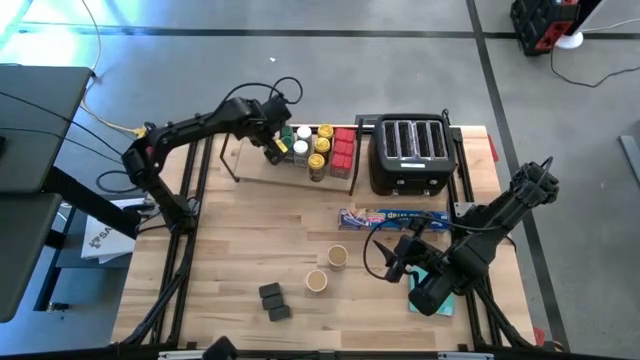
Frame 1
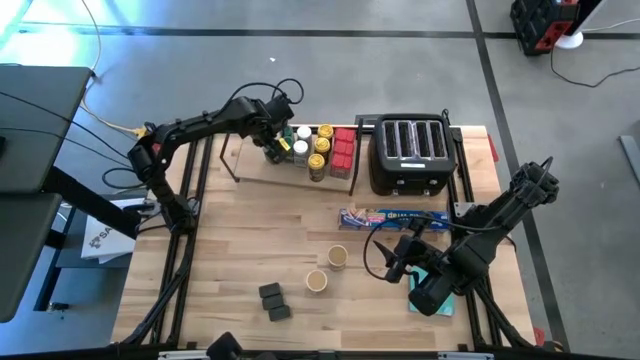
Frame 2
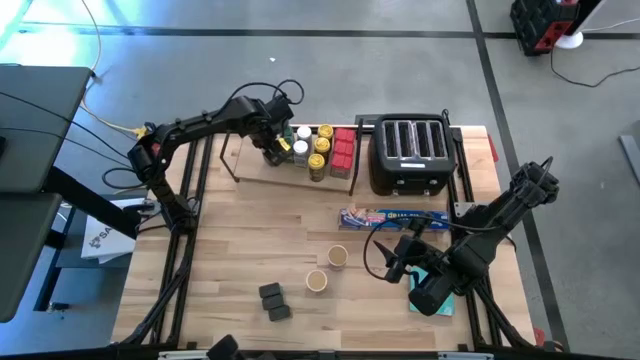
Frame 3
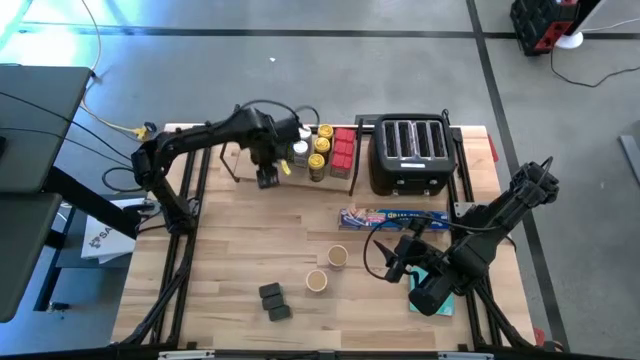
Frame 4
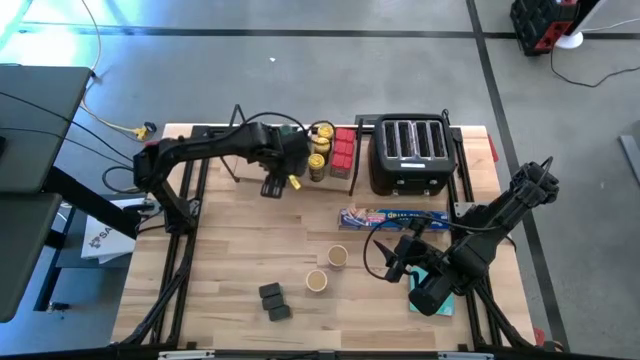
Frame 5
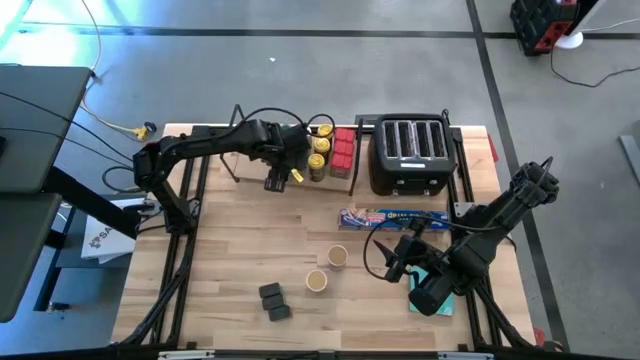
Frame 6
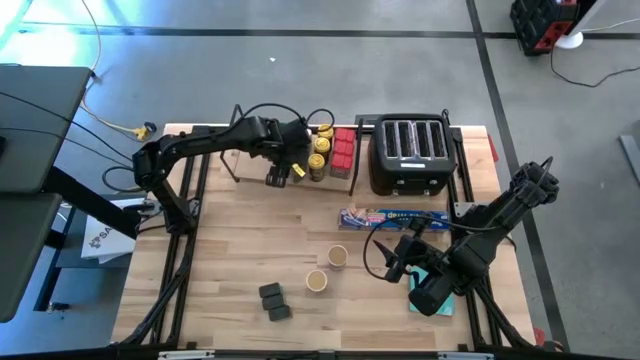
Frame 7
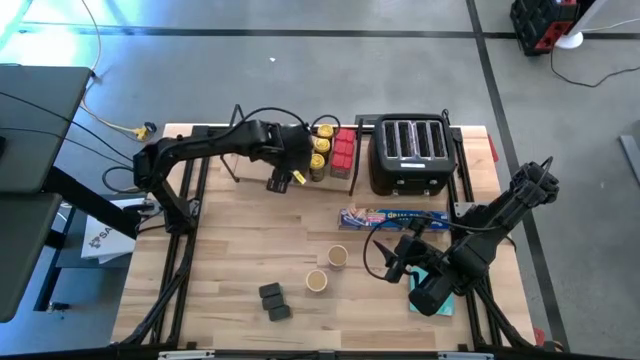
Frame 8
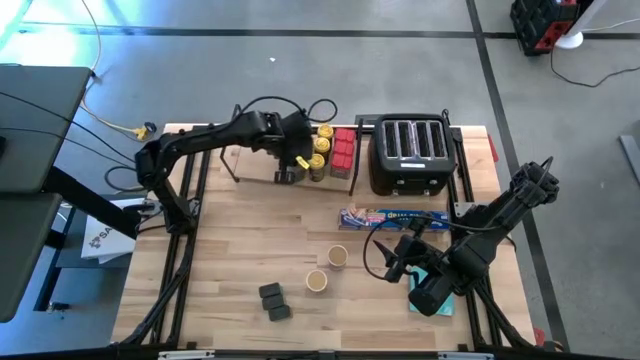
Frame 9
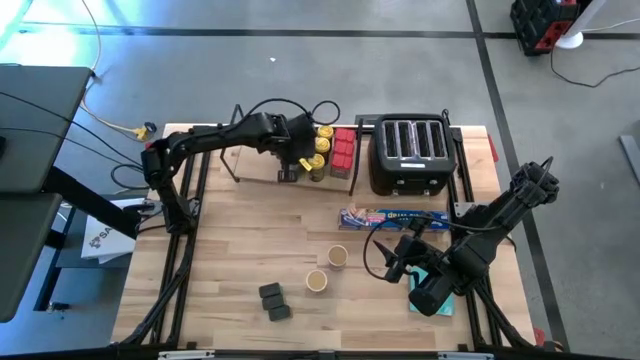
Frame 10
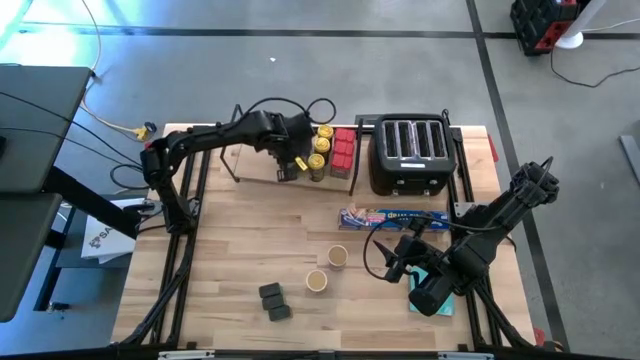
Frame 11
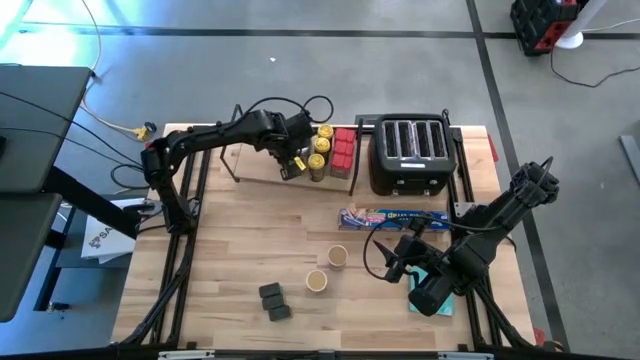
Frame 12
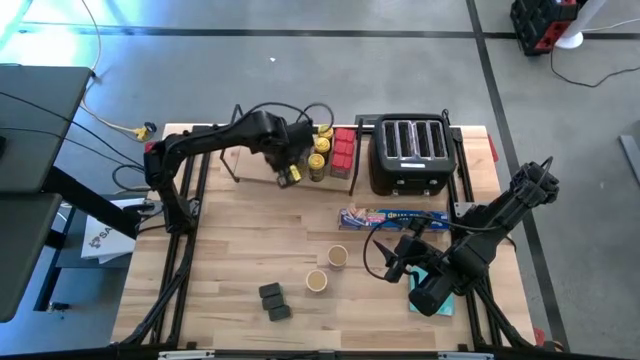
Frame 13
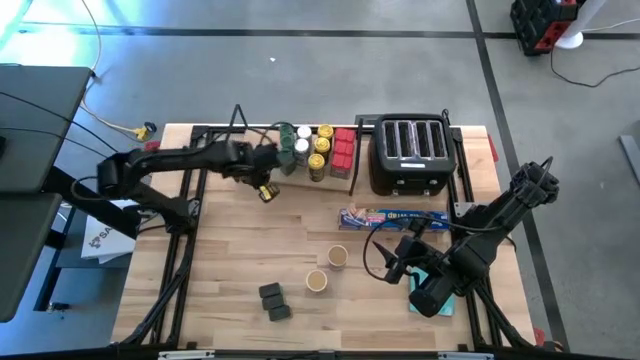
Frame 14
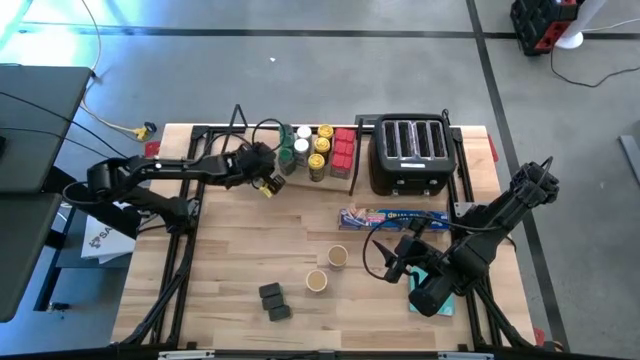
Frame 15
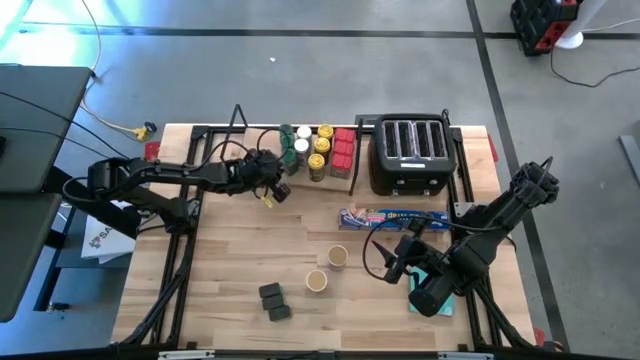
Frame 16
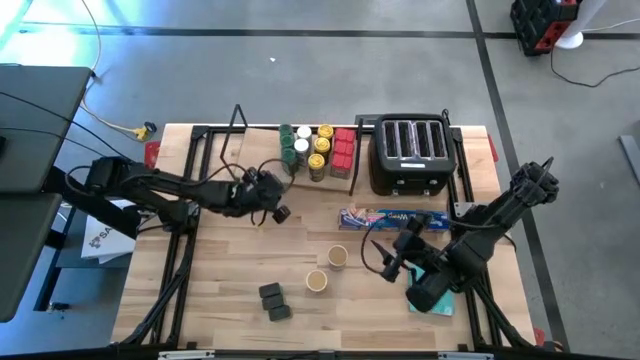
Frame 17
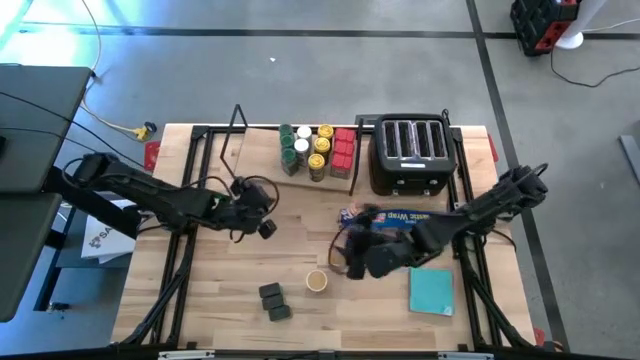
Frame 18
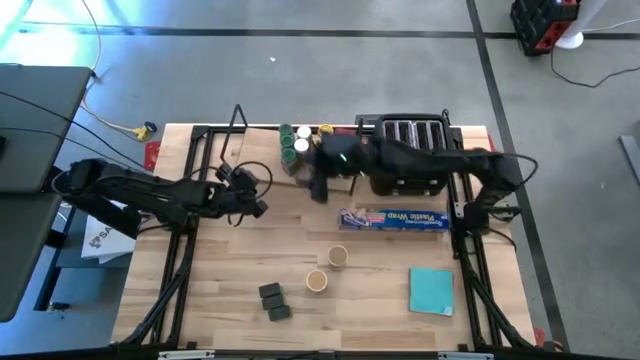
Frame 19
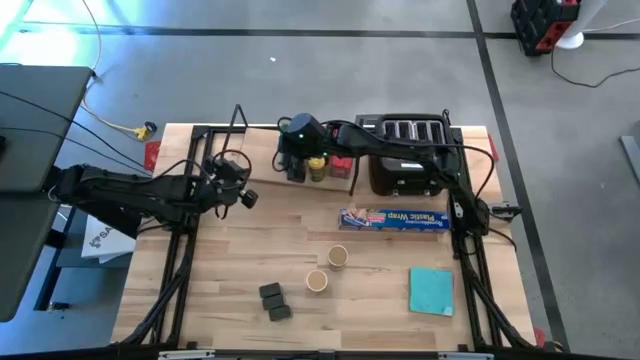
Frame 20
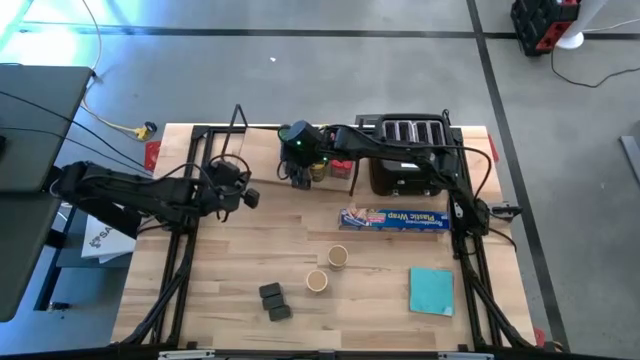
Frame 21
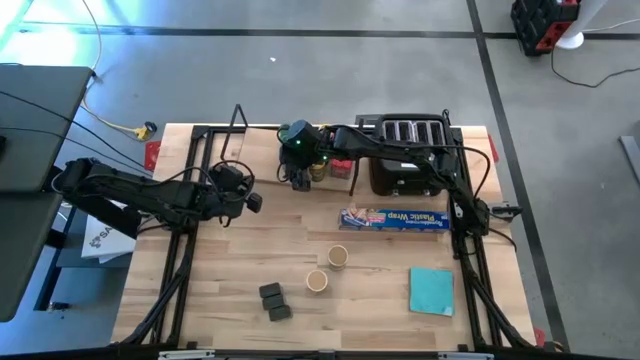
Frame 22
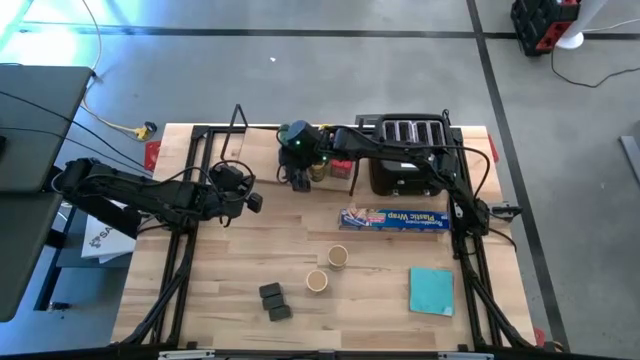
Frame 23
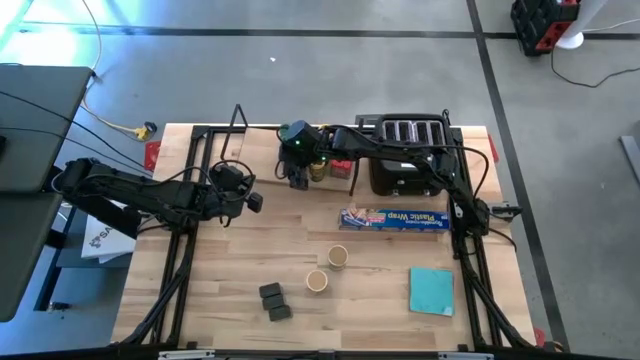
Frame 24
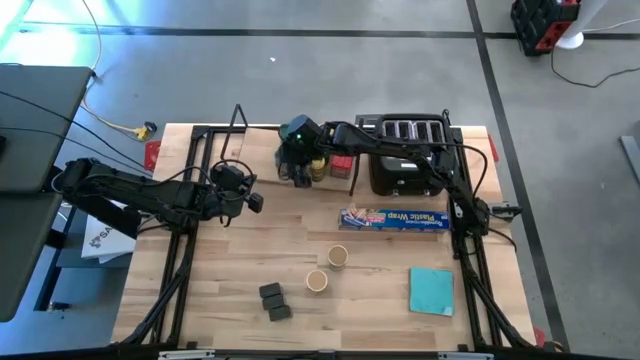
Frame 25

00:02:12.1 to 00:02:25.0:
Task: Shelf spices
Put the green seasoning bottle on the shelf aligned with the other green seasoning bottles

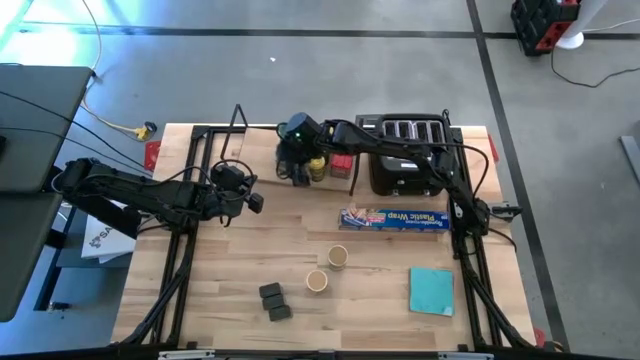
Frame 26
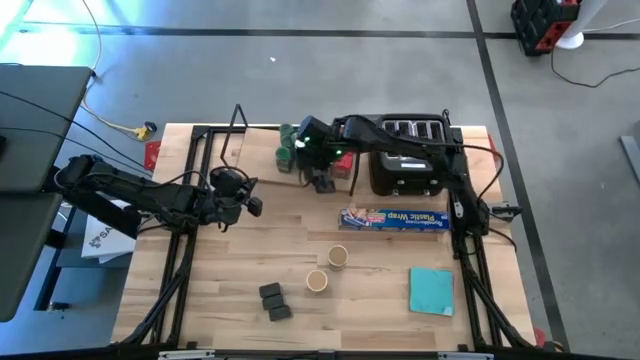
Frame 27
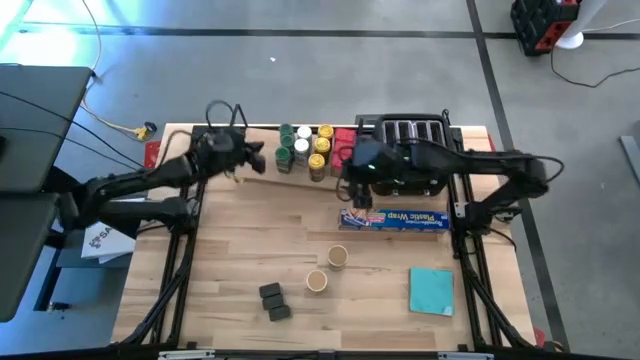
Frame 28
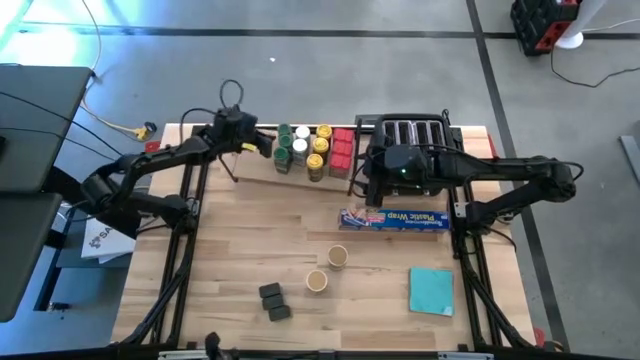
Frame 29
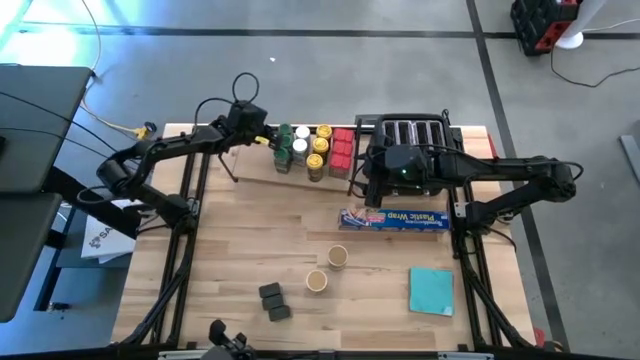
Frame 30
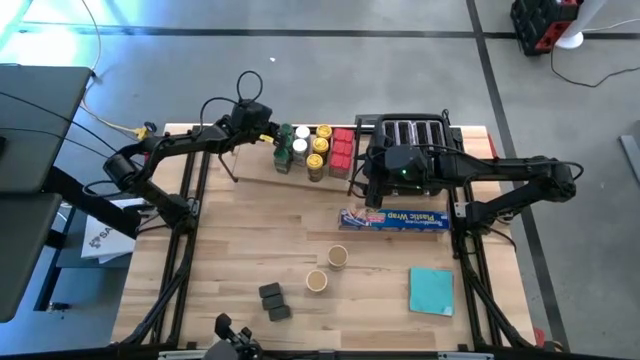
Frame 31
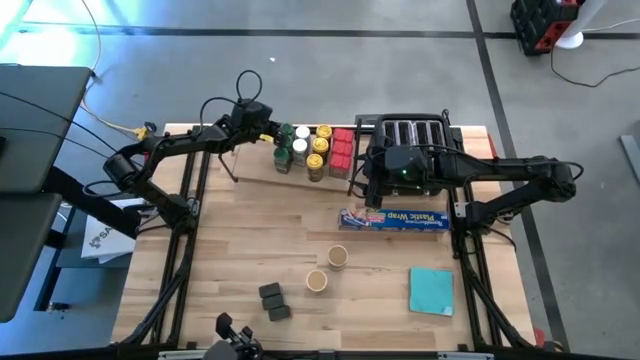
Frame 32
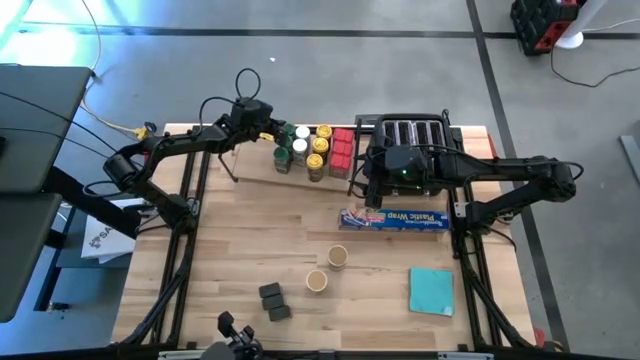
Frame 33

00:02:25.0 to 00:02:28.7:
Adjust the green seasoning bottles on the shelf

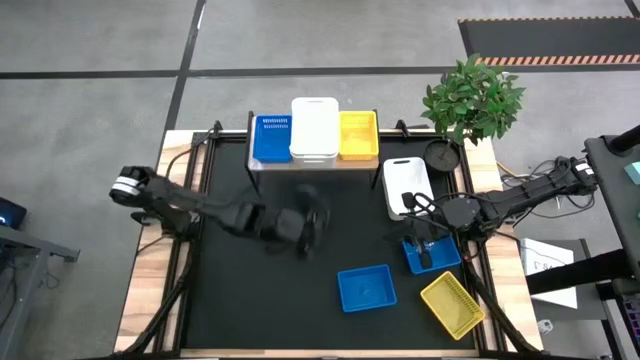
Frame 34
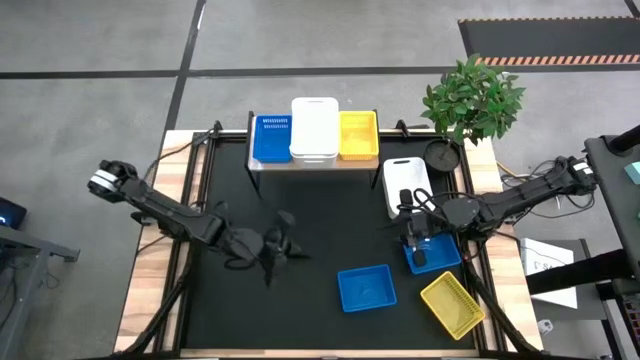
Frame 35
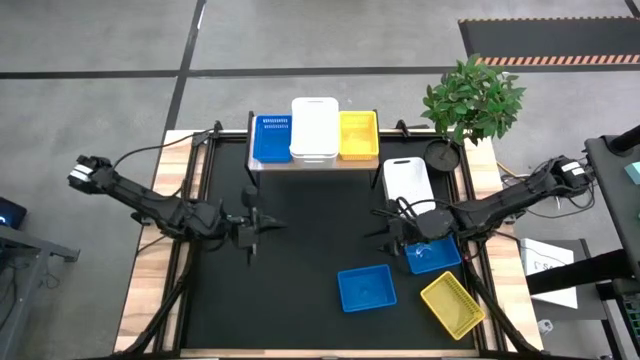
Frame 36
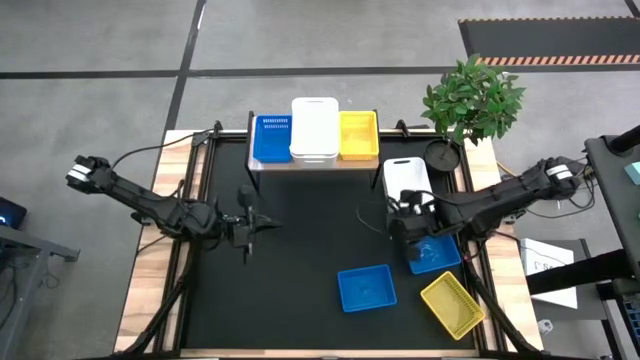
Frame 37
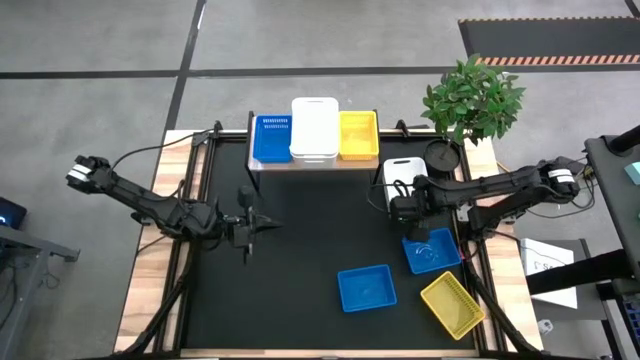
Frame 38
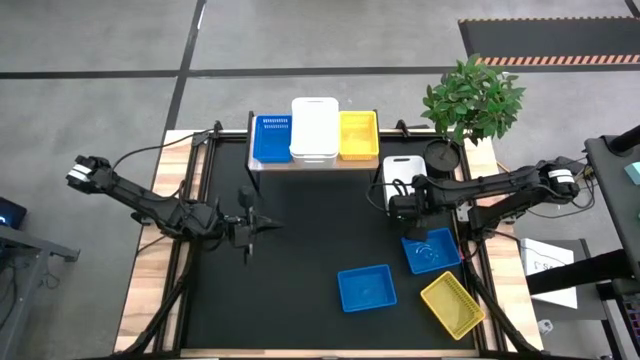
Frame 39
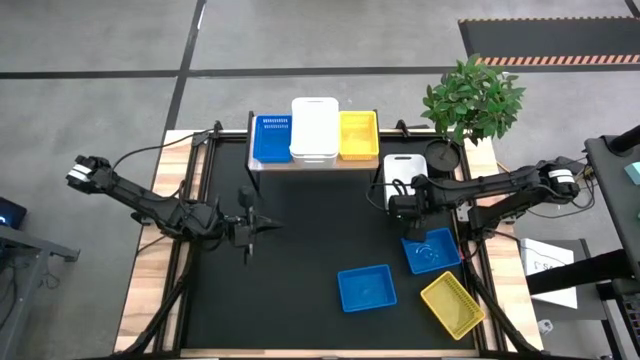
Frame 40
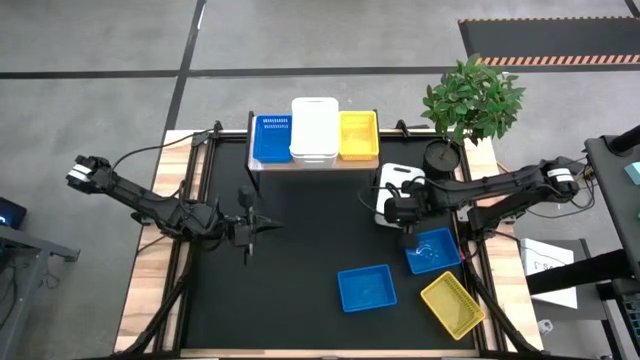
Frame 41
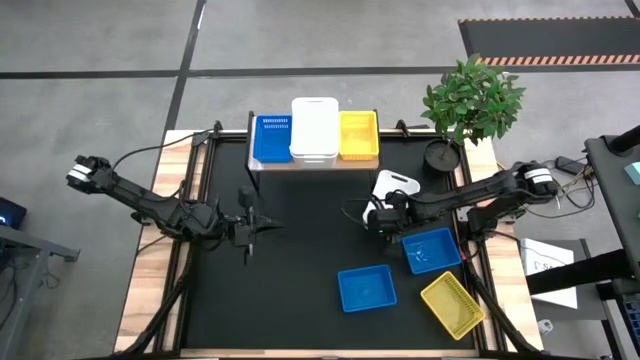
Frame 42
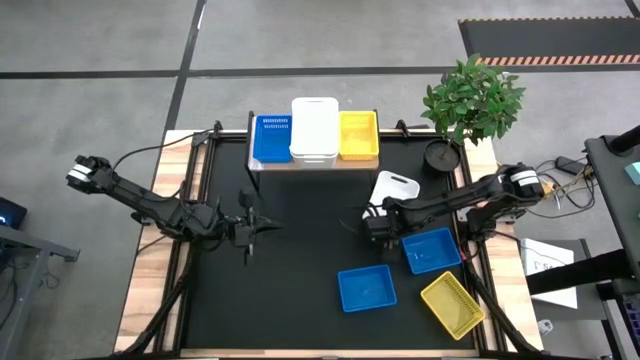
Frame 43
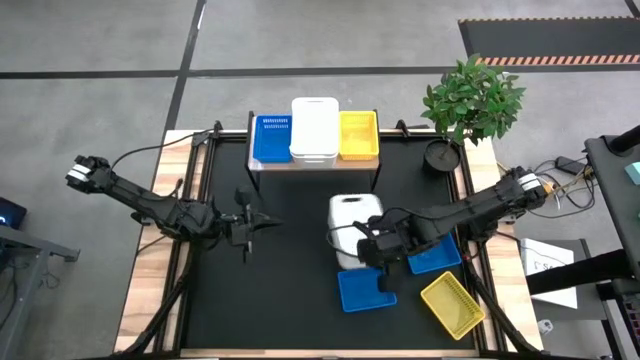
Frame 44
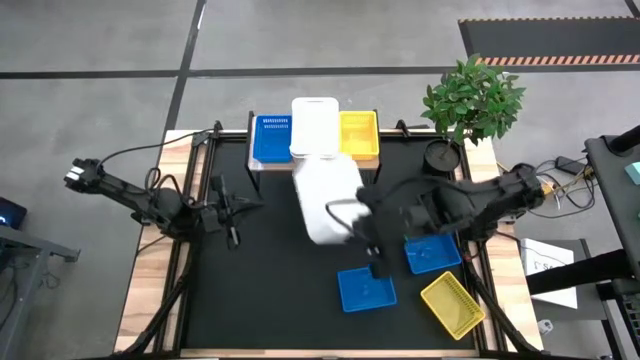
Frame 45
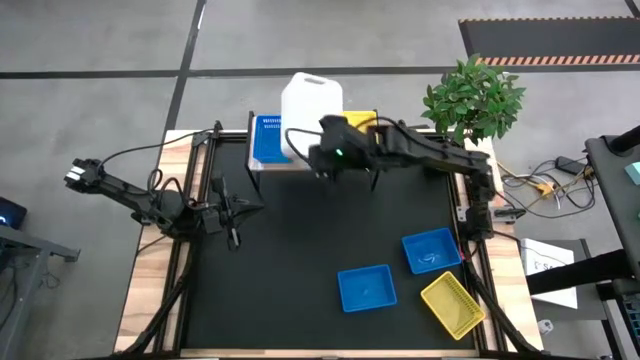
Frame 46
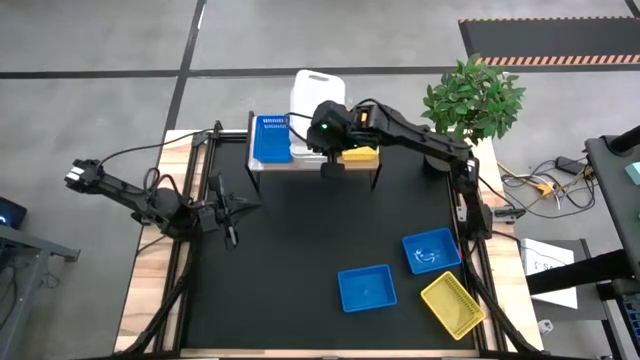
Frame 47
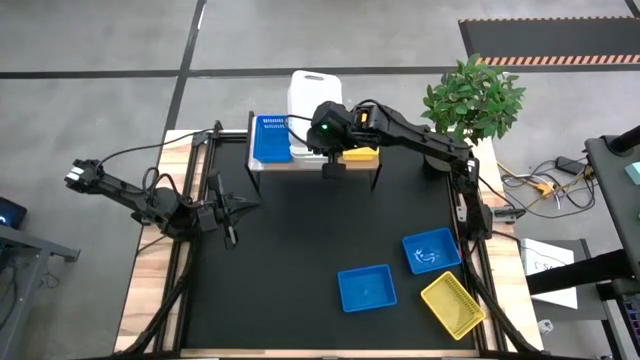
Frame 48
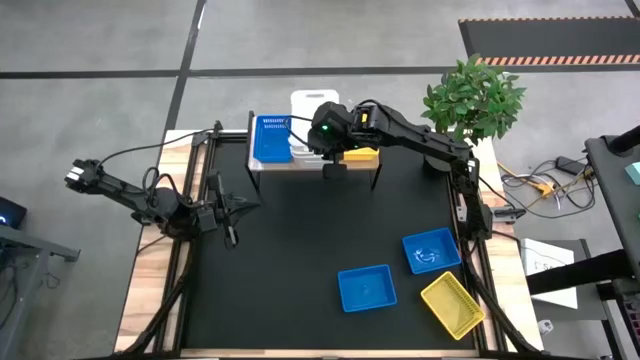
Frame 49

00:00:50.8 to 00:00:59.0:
Task: Stack baskets on shelf by color
Stack the white bin on the white bins on the shelf
